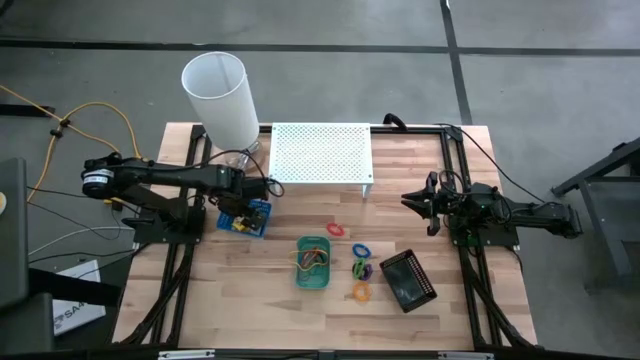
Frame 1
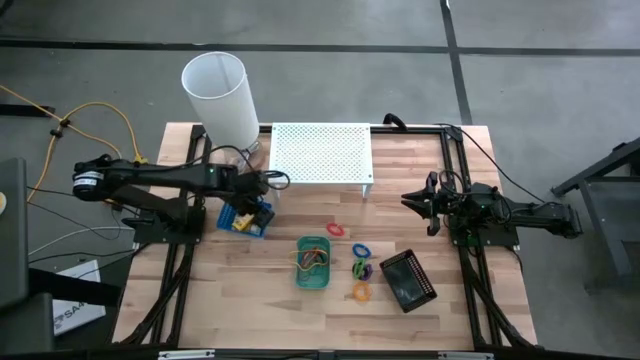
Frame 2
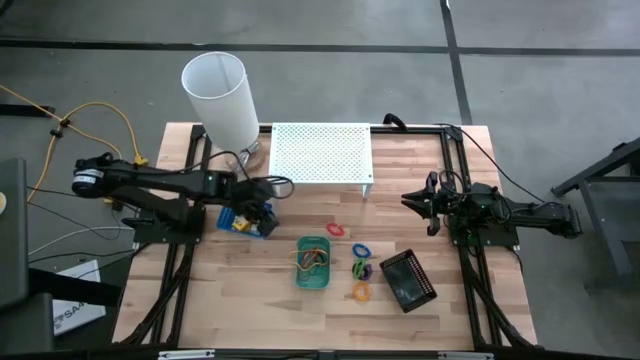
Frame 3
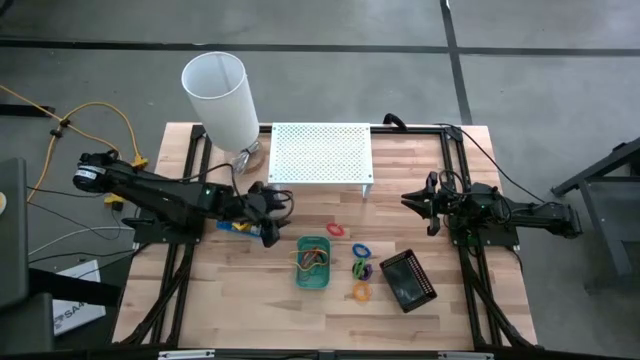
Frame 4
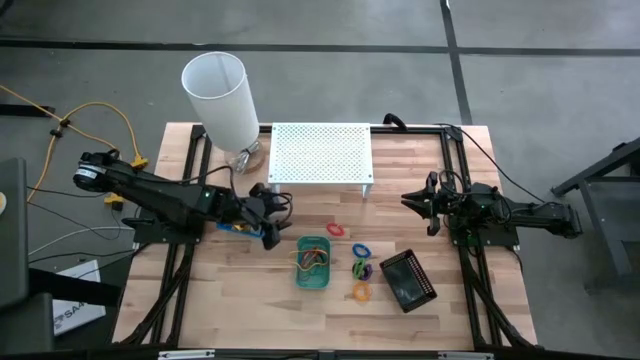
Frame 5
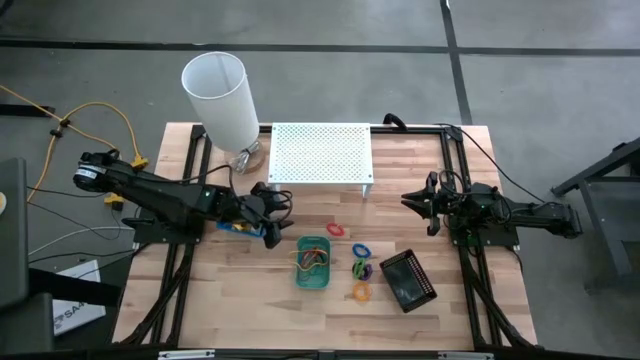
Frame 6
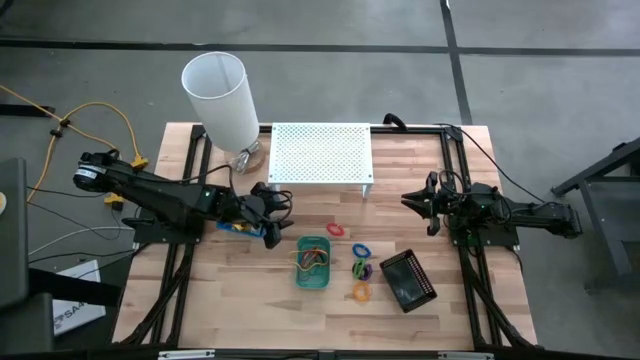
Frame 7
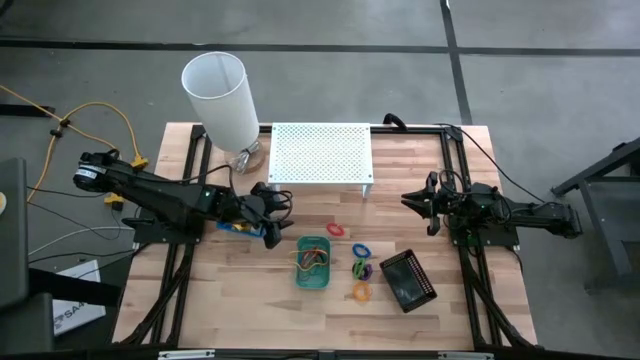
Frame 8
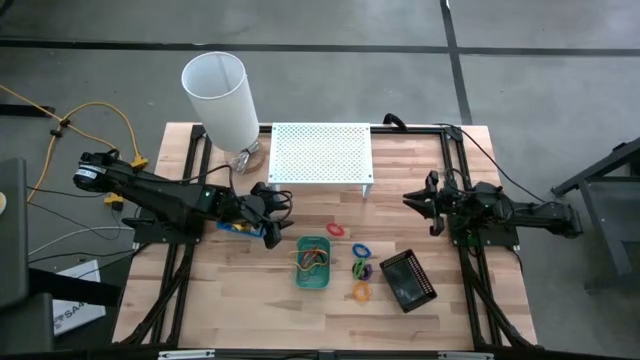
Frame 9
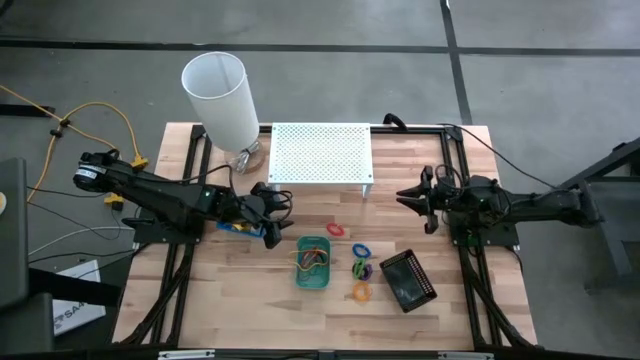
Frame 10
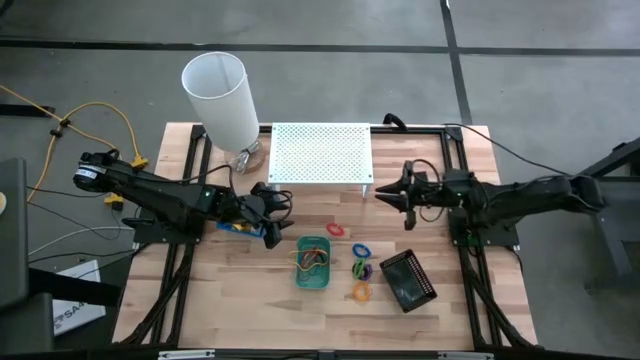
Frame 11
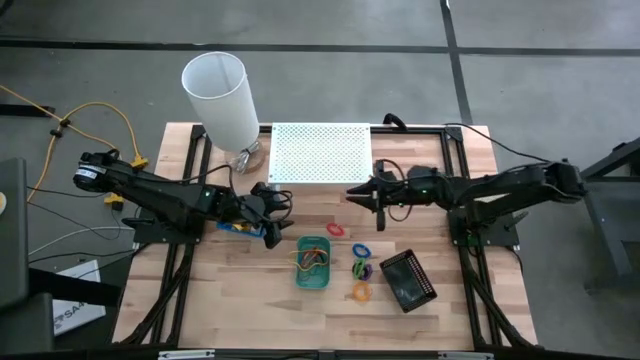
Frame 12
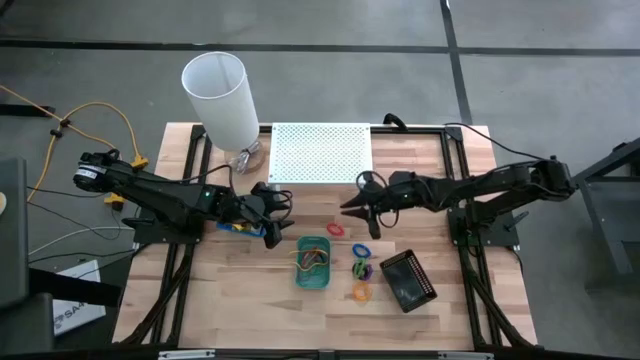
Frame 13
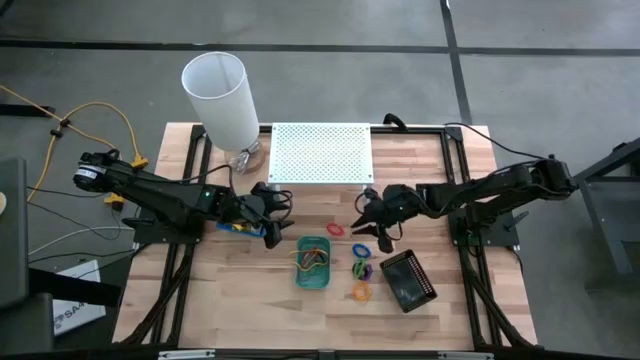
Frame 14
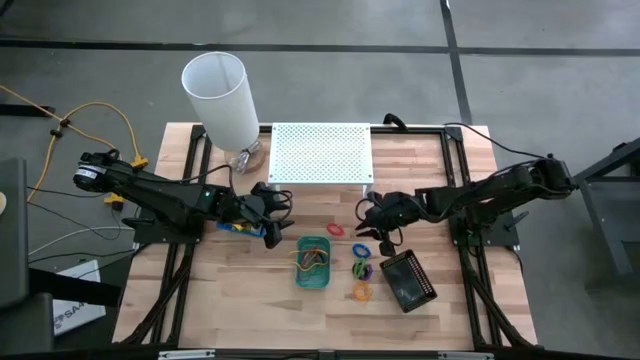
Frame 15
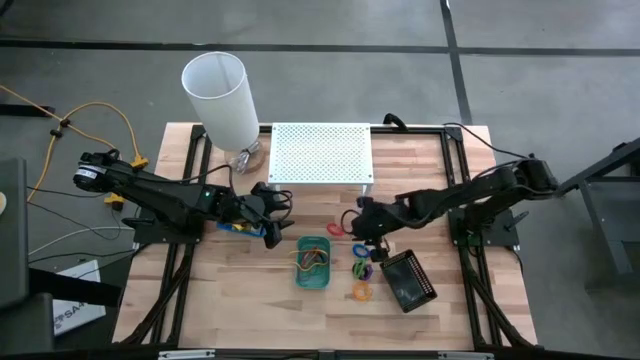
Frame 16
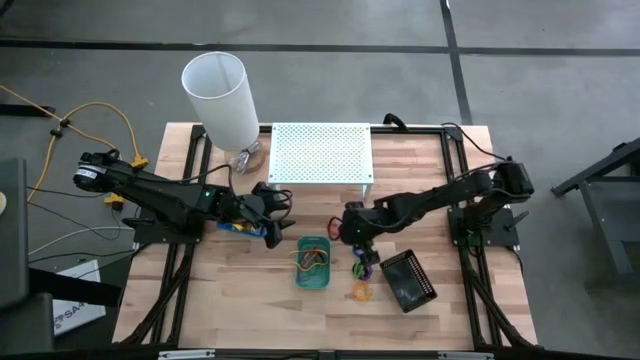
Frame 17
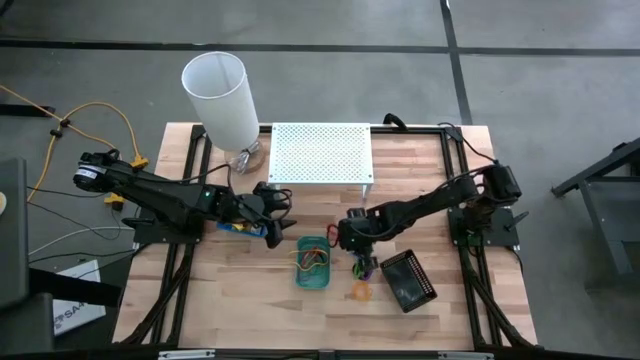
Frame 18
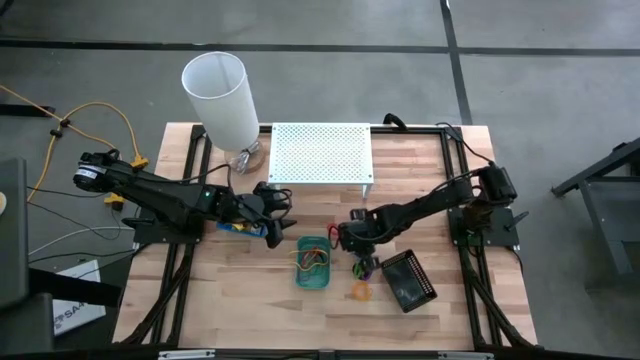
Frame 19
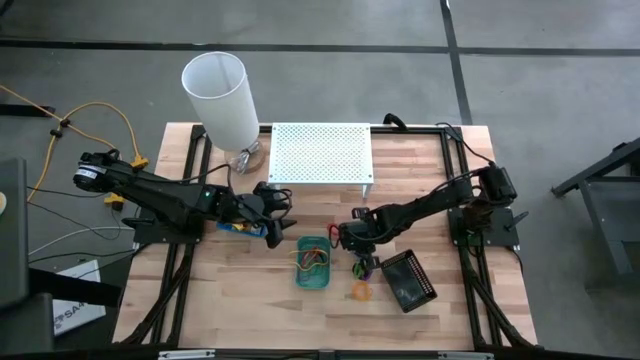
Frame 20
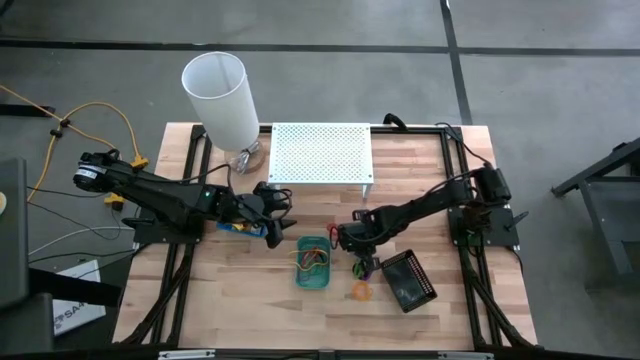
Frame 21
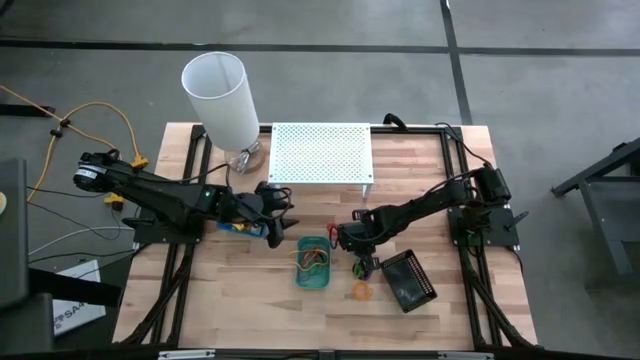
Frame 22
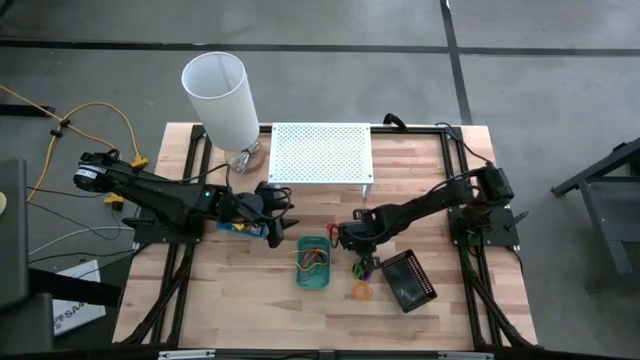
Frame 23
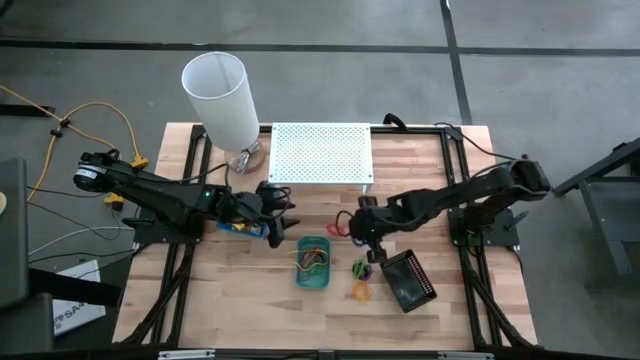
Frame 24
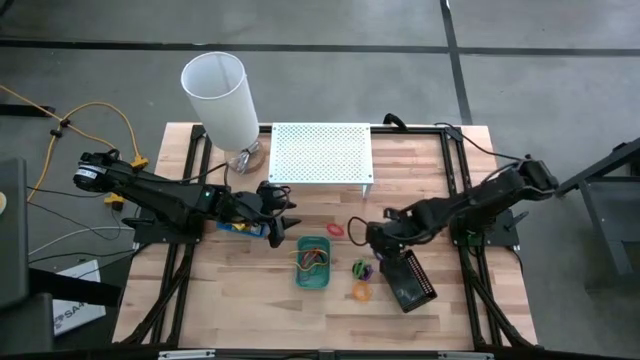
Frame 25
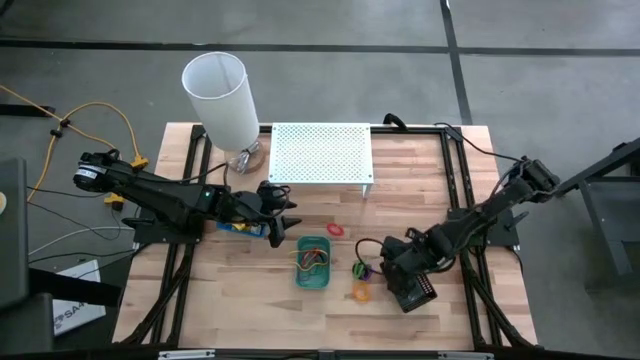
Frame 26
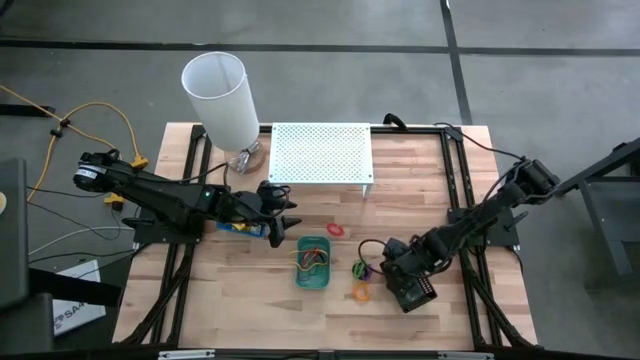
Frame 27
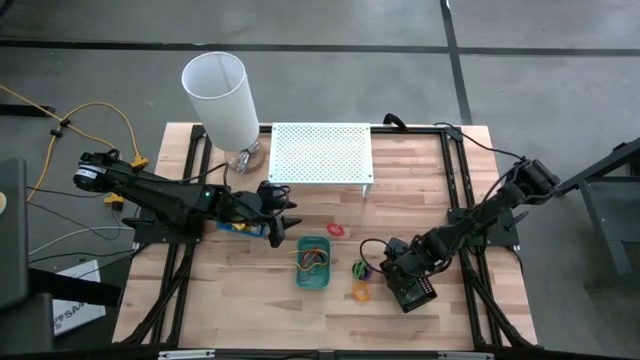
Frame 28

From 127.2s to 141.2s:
Task: Pick & Place Office Desk Supplies
Put the blue spiral keychain band into the black bin

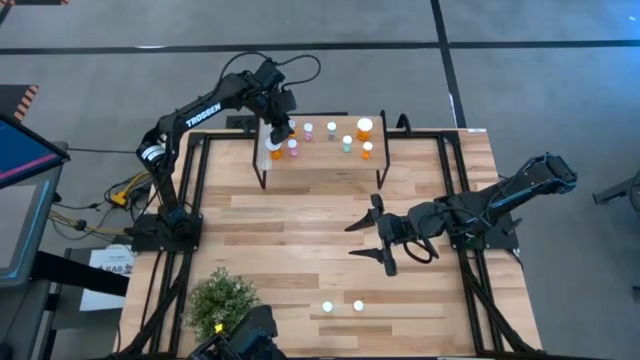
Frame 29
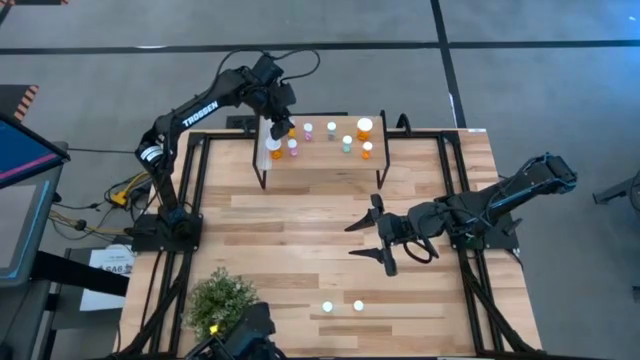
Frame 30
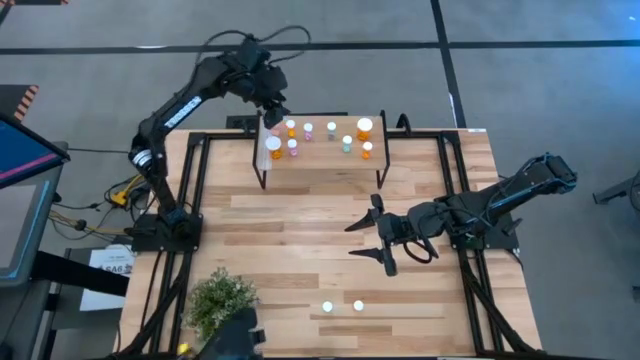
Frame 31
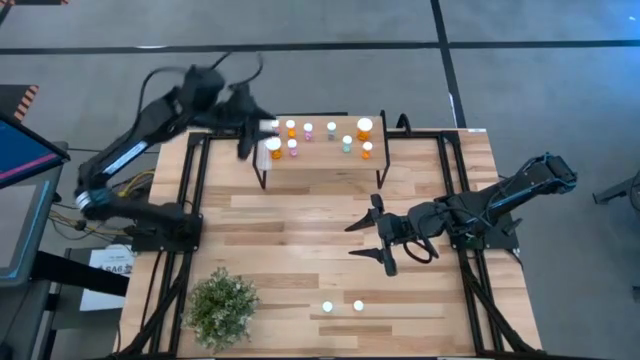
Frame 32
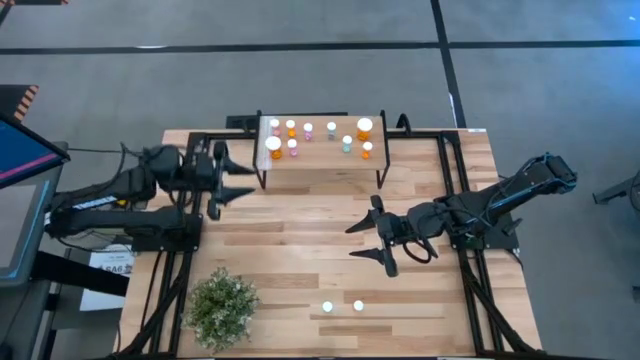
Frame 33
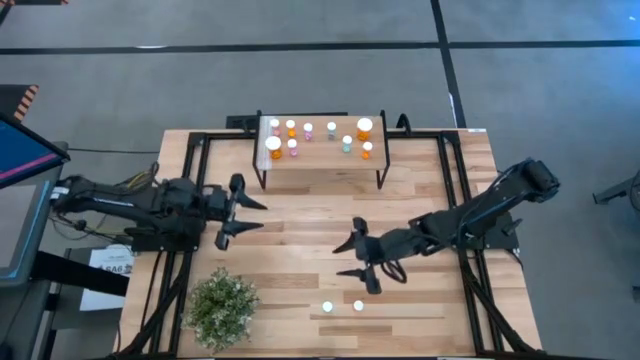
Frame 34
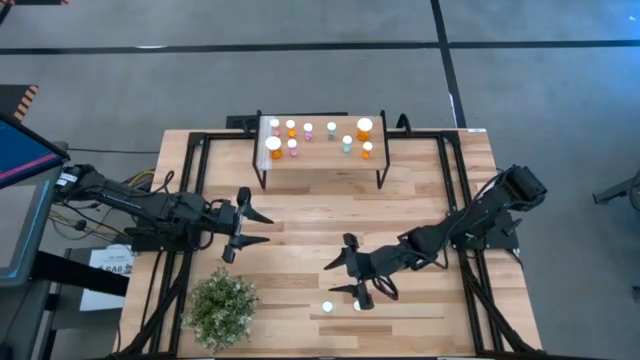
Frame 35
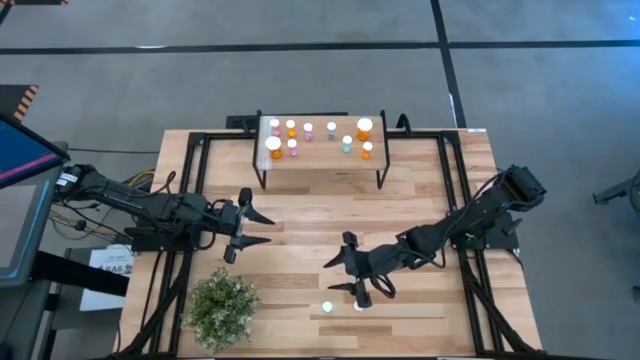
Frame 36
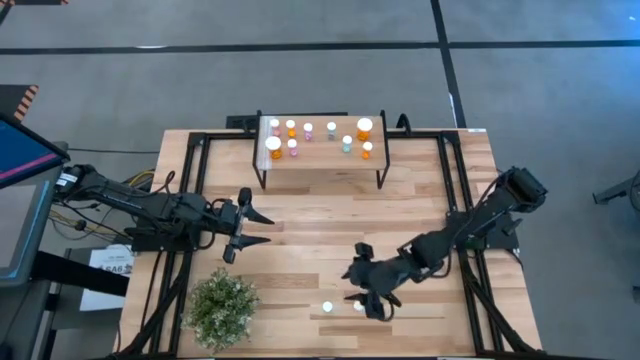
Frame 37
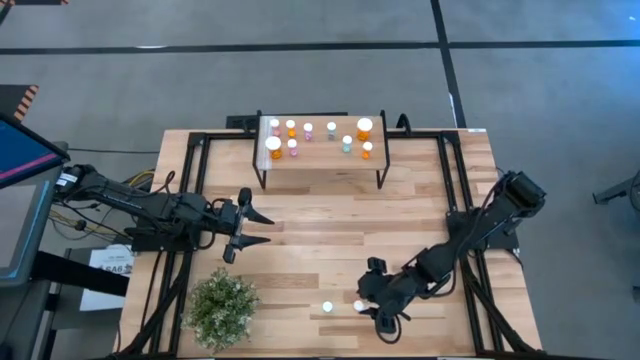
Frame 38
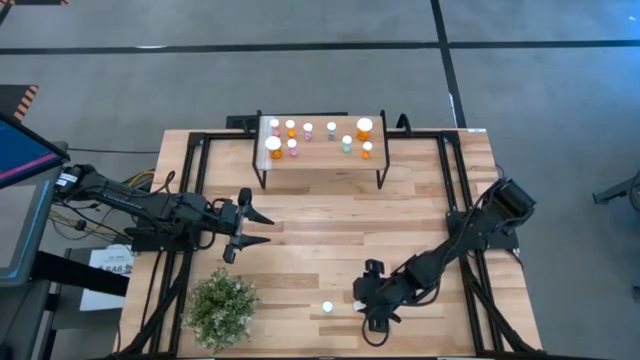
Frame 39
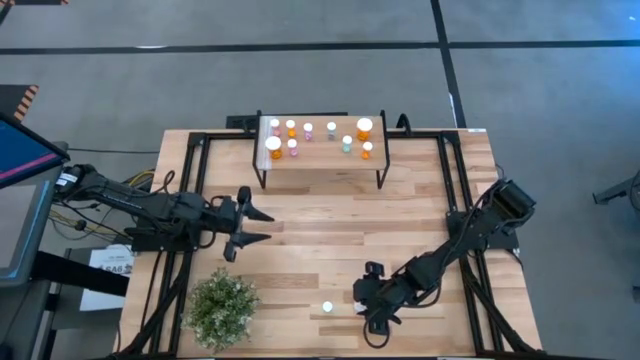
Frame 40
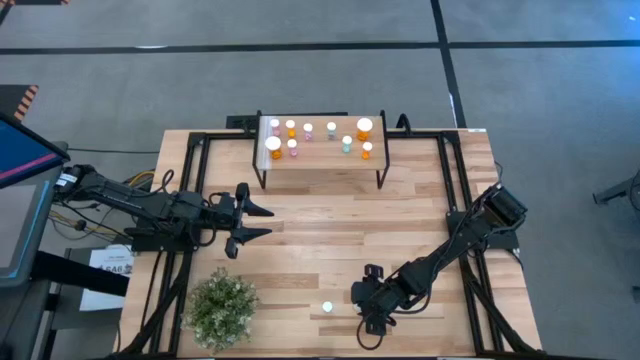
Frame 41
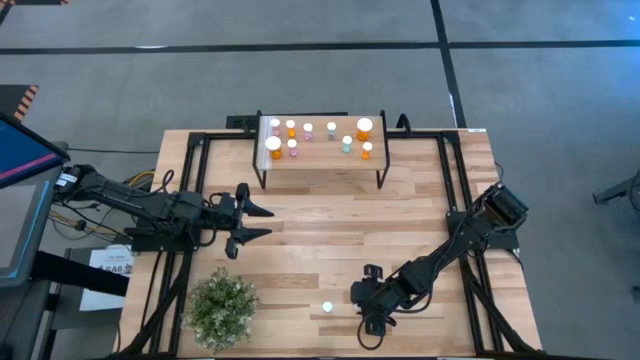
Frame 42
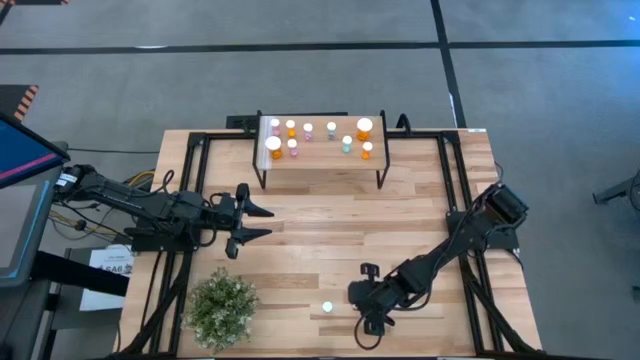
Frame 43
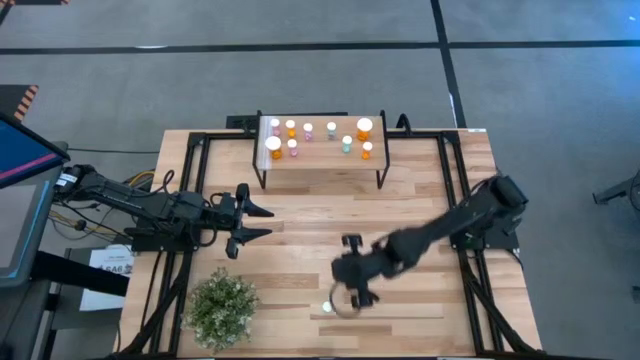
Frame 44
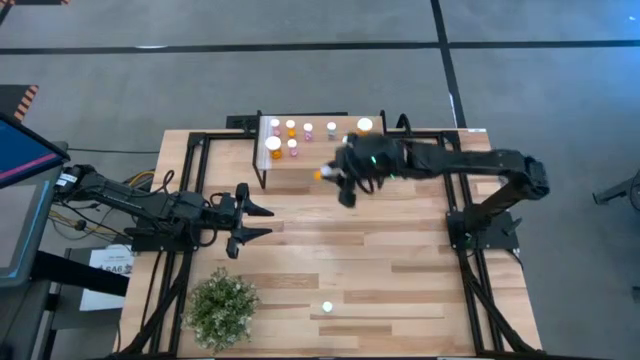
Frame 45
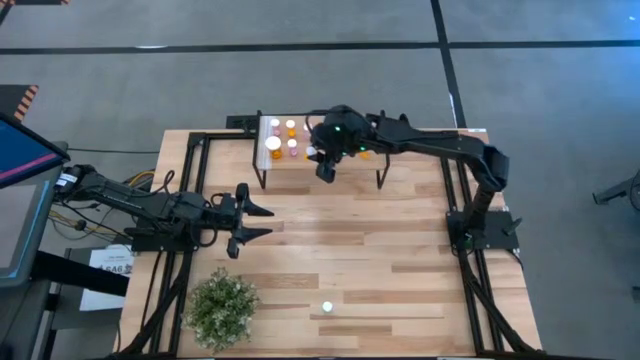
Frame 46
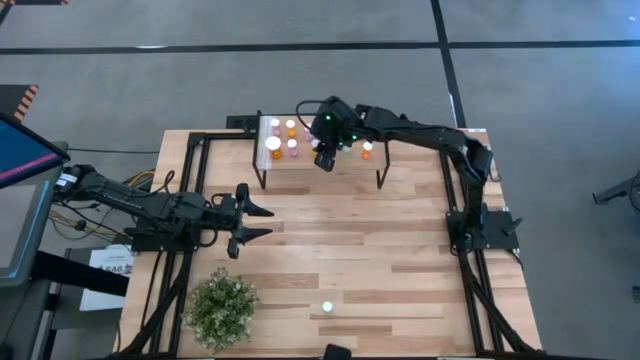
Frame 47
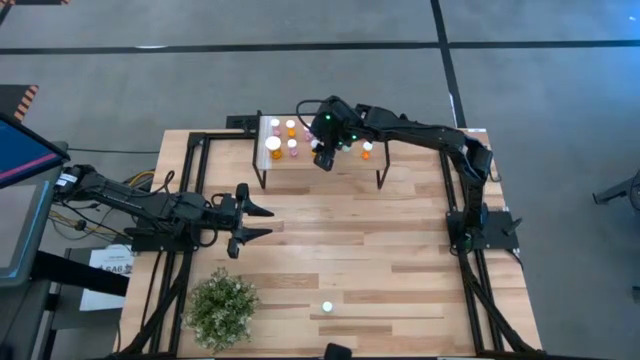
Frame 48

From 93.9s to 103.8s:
Task: Pick and place medicine bottles onto shelf by color
Put the small orange pill bottle on the shelf
